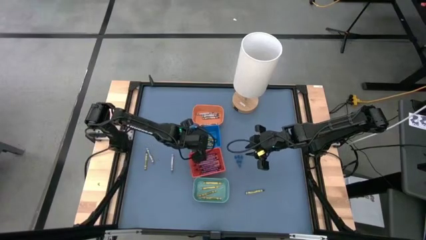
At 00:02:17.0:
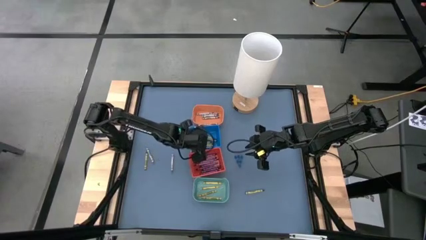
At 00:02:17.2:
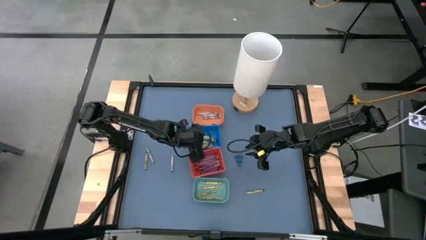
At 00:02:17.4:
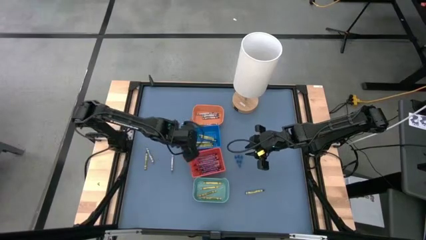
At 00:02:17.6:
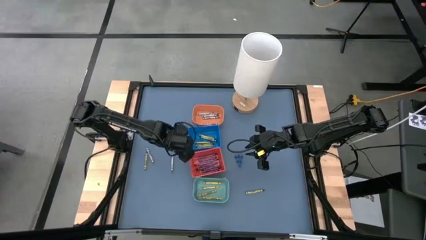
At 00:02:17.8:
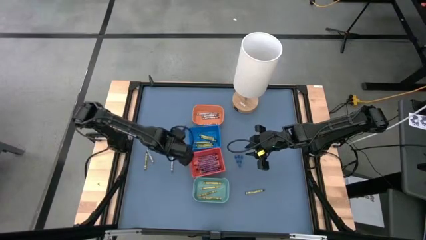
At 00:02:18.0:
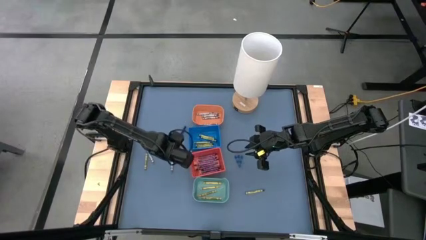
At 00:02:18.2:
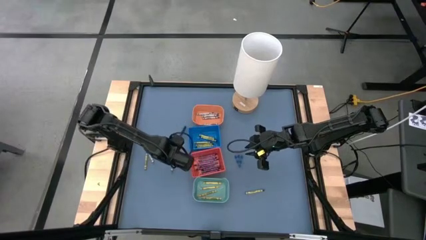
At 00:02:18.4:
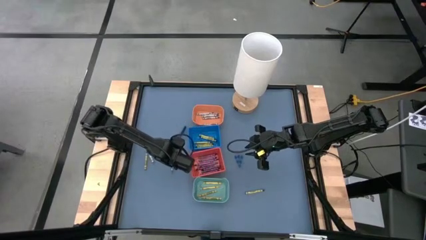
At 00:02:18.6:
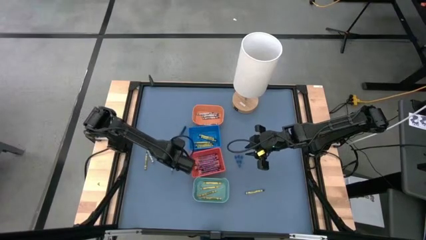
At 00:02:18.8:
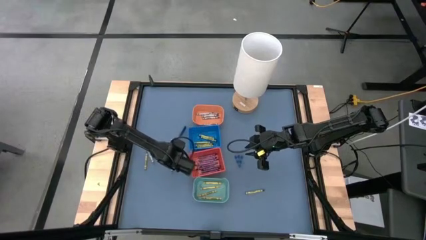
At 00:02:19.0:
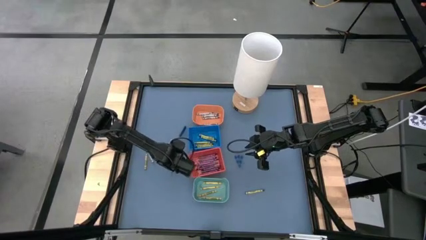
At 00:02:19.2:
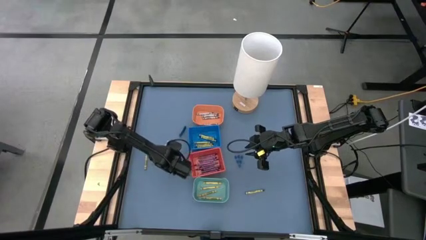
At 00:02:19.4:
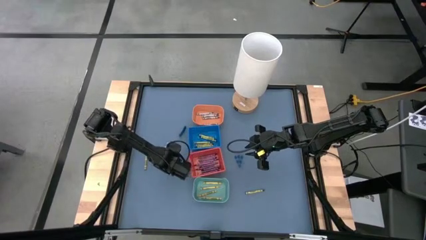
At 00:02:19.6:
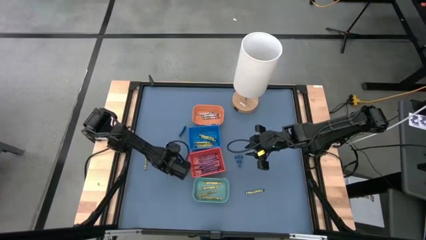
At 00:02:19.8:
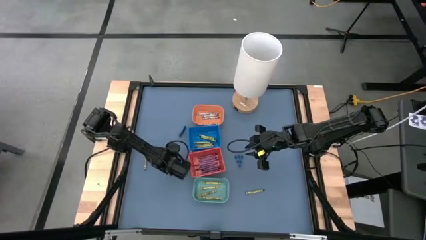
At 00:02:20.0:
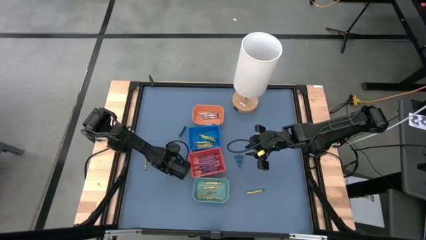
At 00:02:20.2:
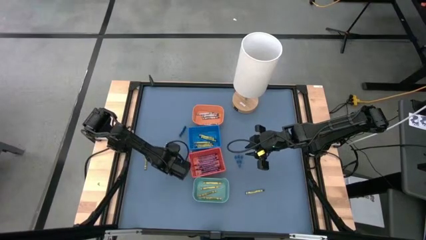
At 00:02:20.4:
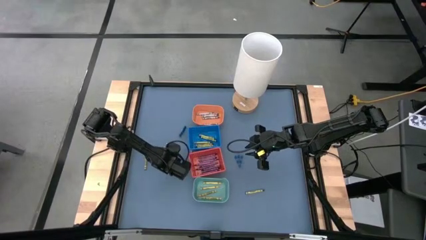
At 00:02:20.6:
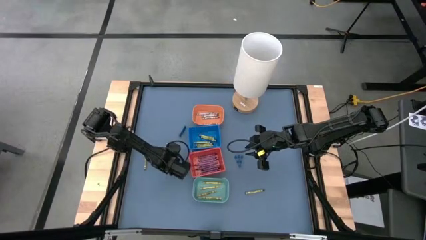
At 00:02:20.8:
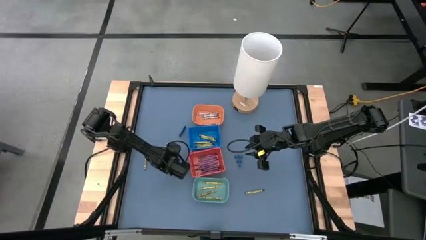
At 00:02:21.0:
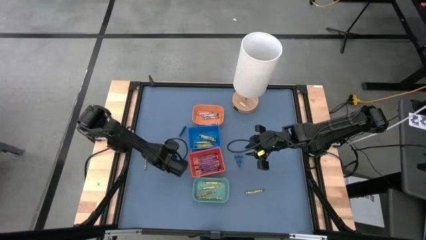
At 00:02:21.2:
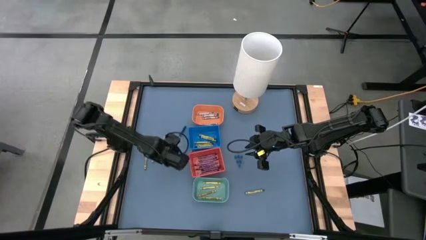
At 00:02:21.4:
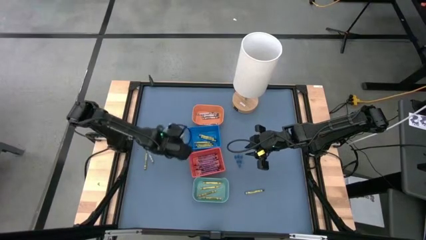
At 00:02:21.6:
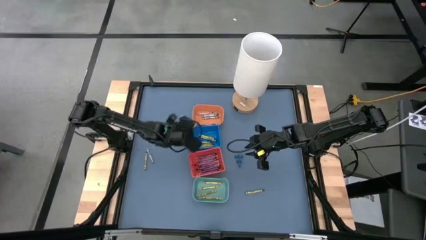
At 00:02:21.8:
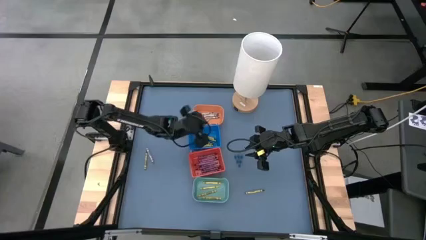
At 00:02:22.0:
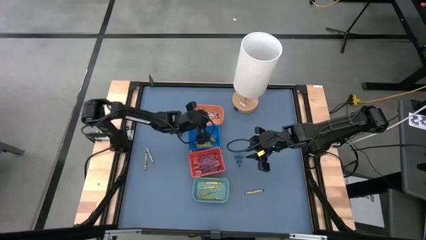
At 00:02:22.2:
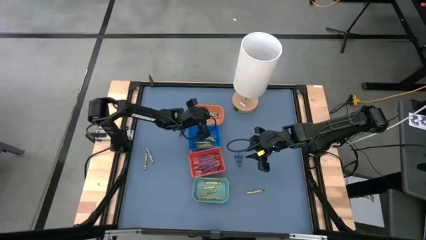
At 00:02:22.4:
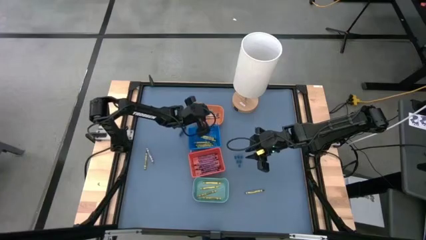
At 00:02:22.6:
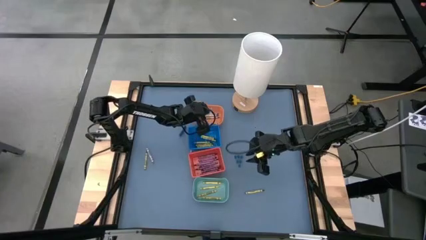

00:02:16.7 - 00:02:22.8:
Task: Sort crayons
Put the gray crayon into the orange bin

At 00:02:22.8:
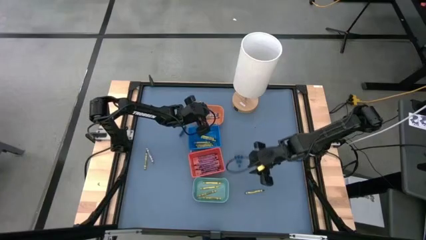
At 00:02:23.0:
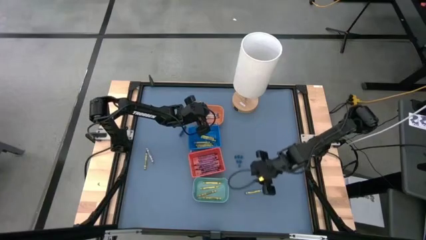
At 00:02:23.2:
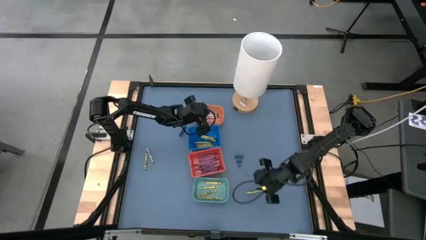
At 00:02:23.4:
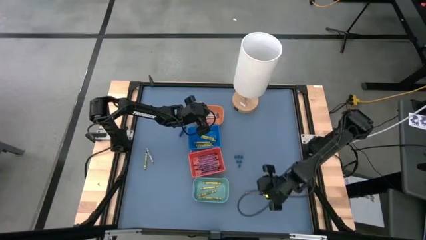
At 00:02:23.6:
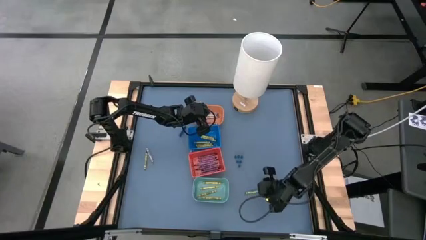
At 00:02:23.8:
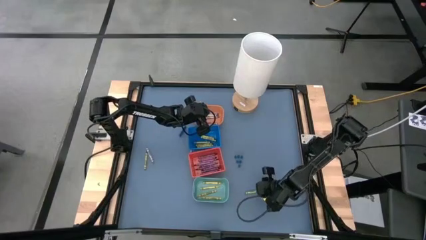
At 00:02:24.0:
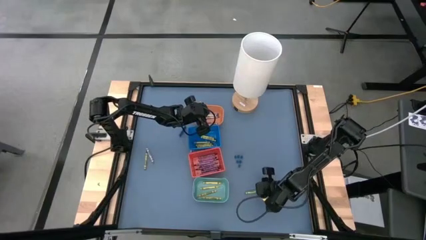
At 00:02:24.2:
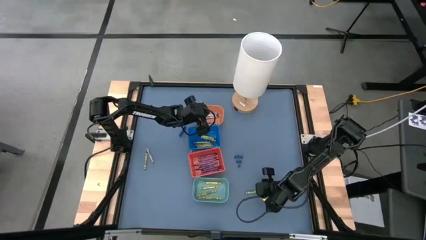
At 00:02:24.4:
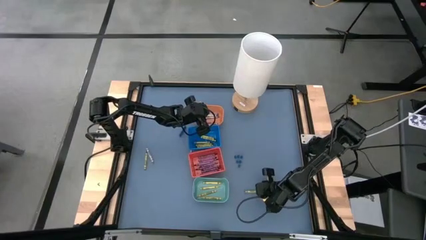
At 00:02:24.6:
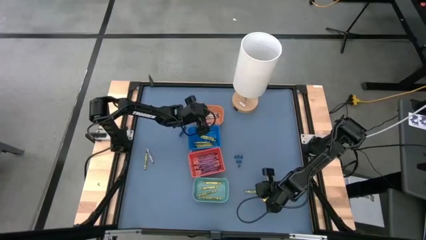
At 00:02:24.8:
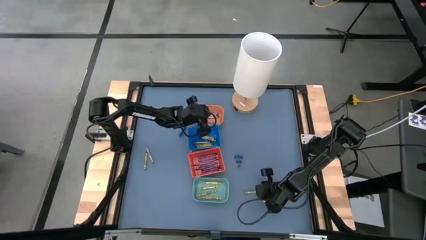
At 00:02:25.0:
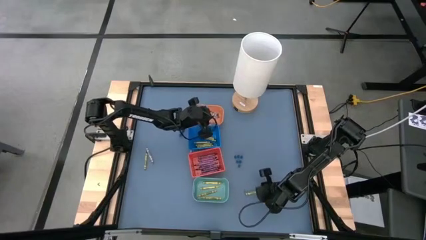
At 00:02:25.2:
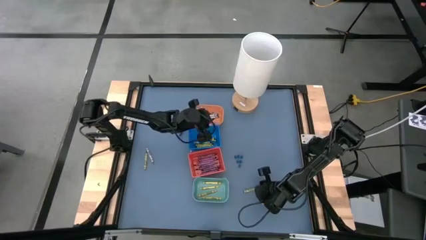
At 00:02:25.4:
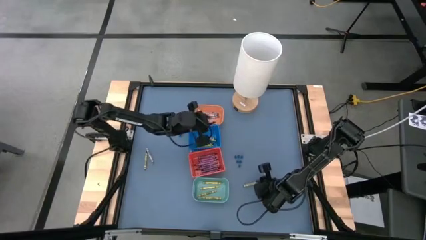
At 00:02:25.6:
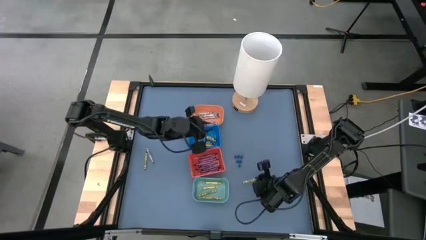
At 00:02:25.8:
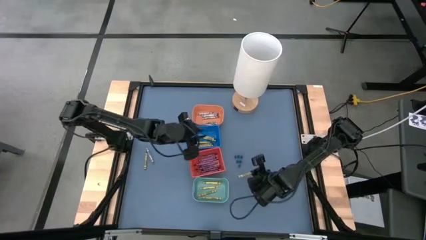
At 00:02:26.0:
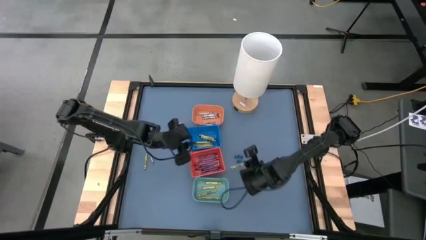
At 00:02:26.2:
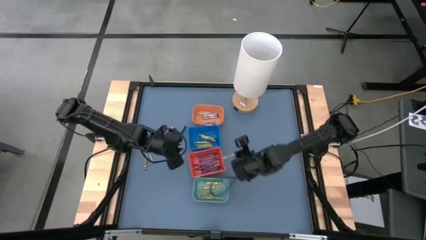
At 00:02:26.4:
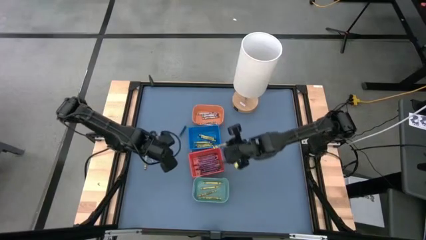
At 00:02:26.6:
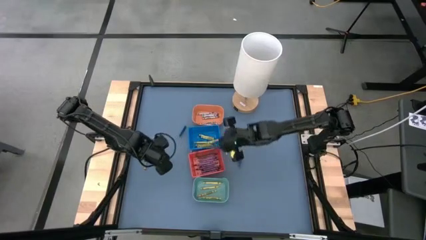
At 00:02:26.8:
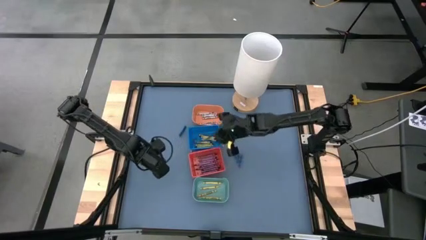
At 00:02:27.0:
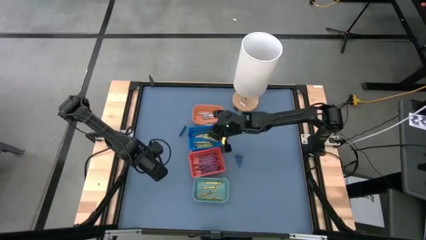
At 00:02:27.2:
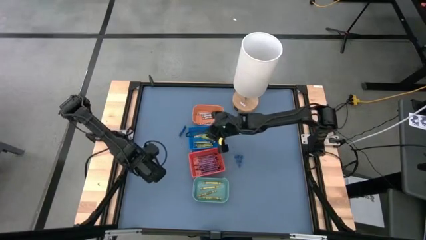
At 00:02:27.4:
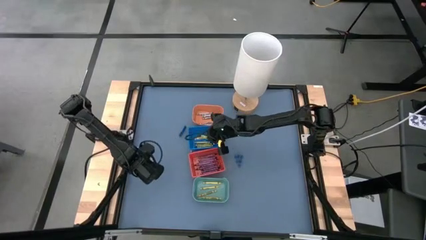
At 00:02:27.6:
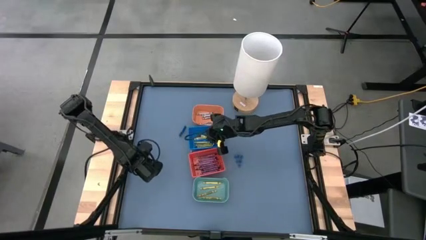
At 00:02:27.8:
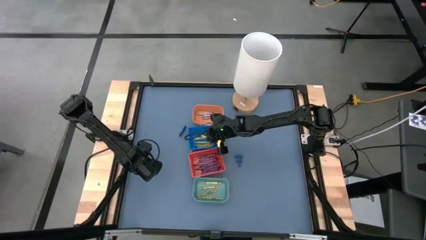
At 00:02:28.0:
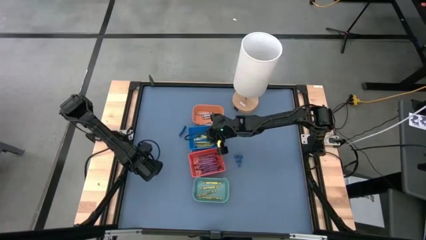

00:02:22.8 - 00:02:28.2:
Put the green crayon into the blue bin

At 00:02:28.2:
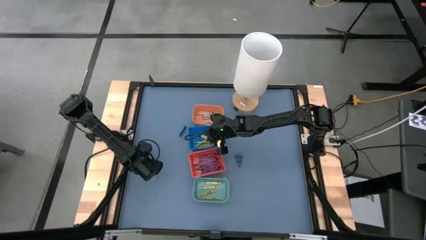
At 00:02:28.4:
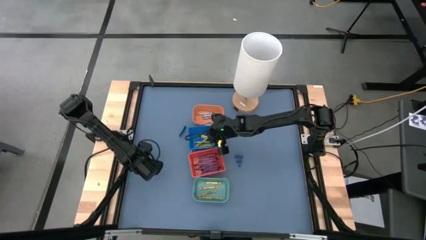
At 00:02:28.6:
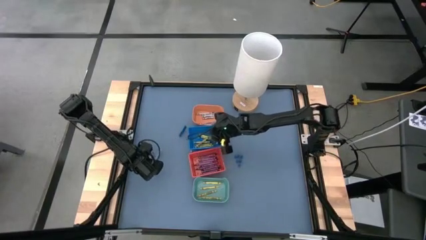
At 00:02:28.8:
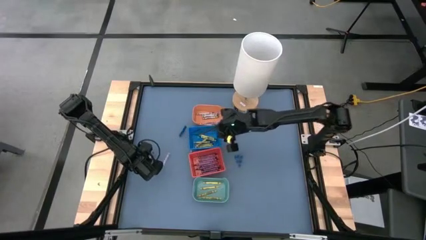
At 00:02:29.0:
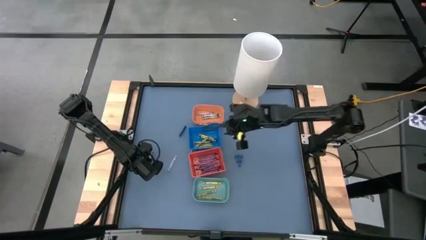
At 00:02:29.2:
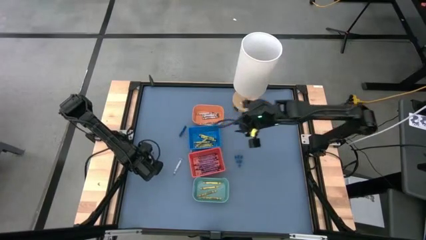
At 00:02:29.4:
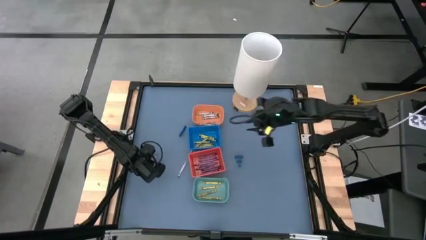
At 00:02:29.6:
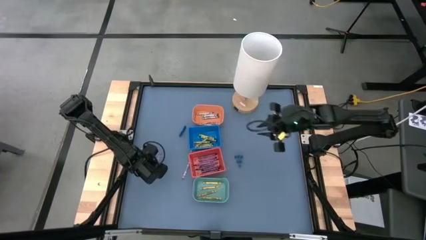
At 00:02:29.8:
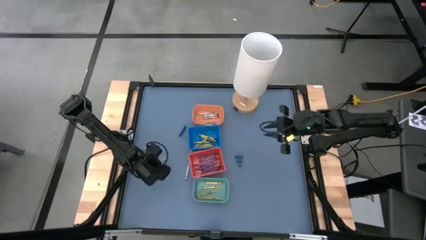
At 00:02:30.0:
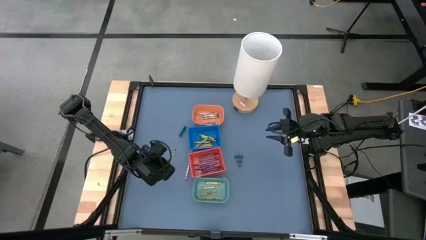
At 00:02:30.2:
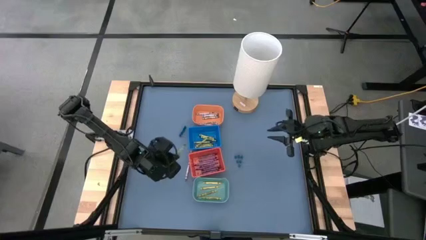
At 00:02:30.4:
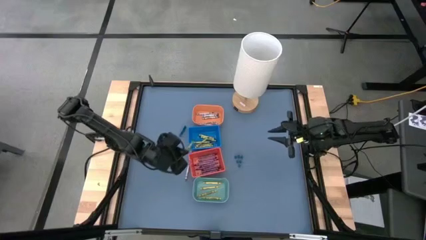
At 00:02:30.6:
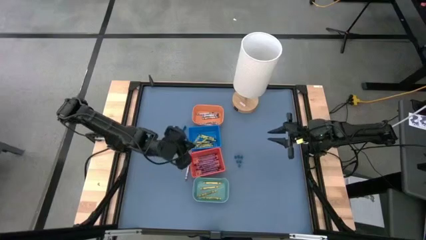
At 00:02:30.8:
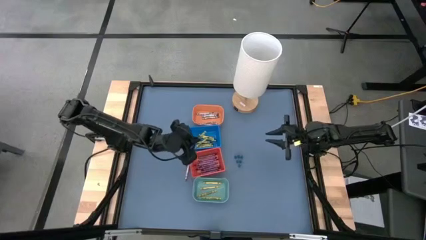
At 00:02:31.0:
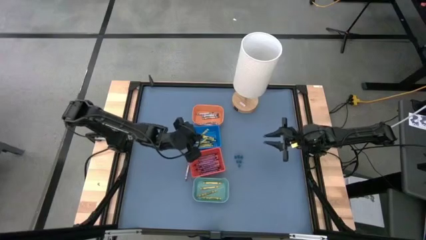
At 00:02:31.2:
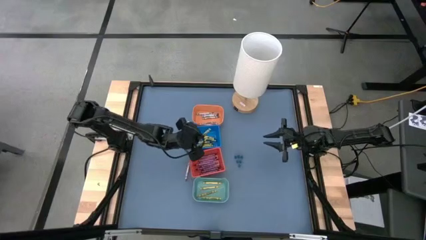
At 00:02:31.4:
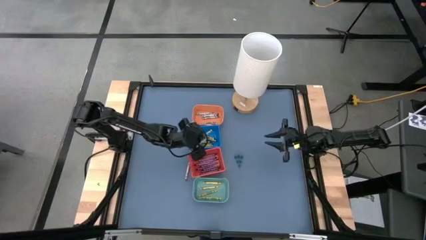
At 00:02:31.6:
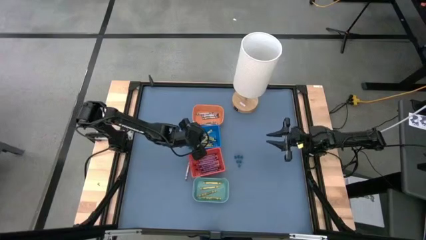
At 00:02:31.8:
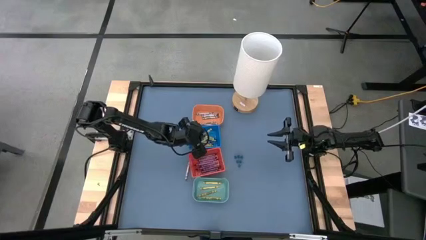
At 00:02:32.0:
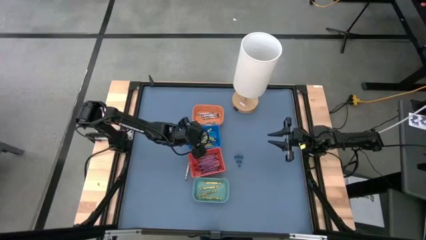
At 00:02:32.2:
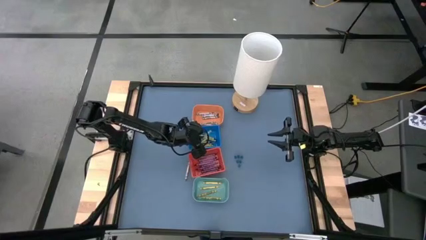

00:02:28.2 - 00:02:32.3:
Put the green crayon into the blue bin

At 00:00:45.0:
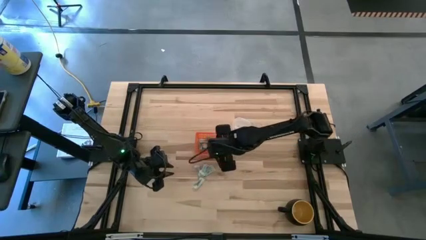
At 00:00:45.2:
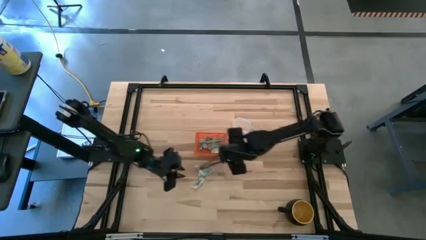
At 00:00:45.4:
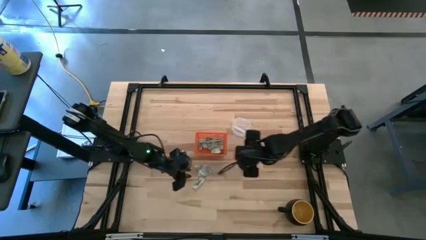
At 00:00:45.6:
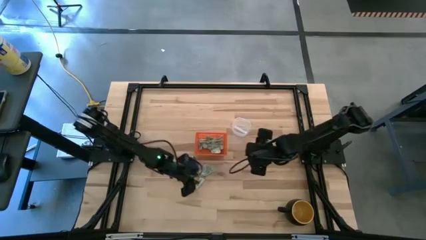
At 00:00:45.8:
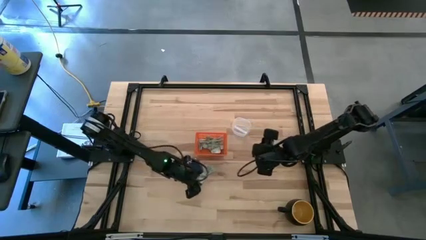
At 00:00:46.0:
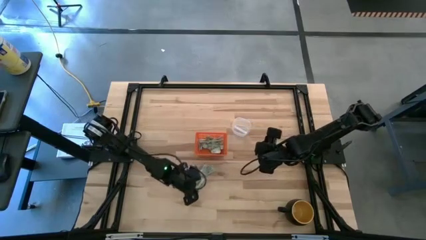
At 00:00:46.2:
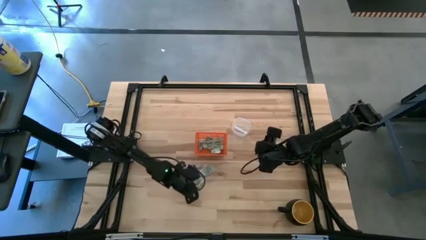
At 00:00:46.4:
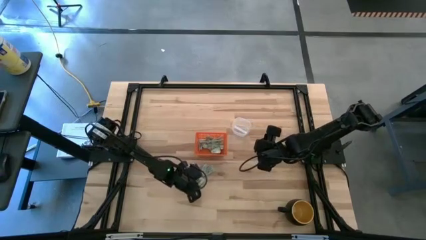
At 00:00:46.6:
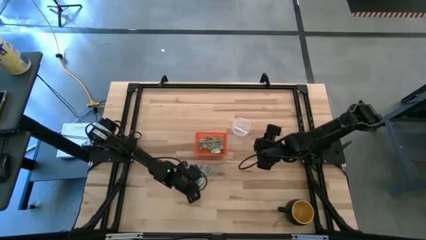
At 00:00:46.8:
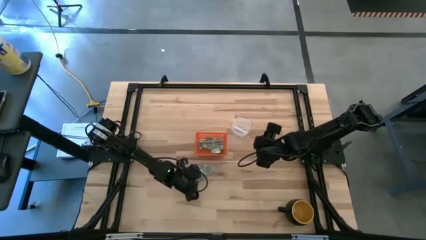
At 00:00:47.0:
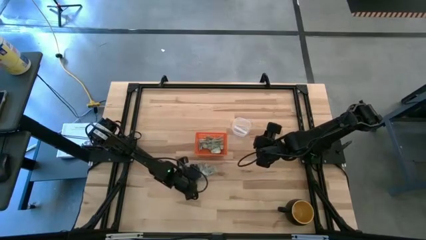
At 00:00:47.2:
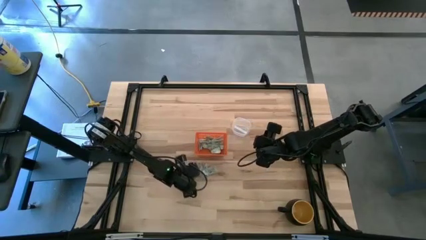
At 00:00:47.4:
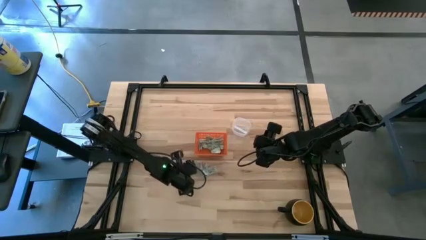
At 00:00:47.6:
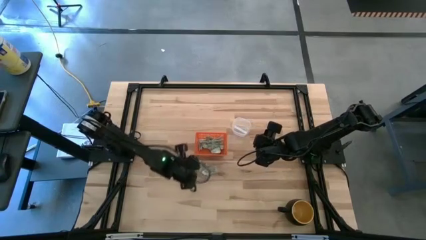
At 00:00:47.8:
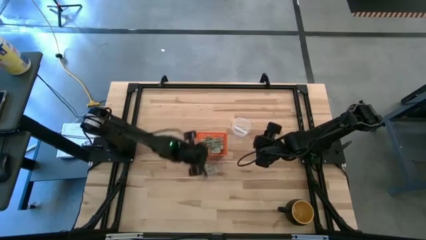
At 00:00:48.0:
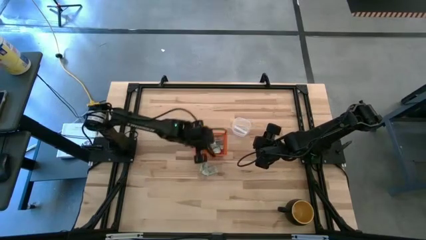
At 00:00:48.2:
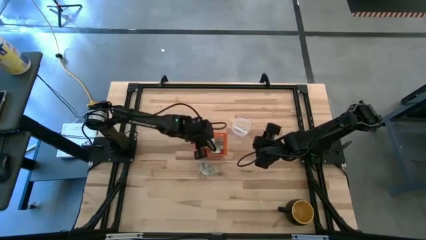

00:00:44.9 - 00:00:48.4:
Task: Pick and place Stevia / Truvia into bins
Put the stevia packet into the basket
